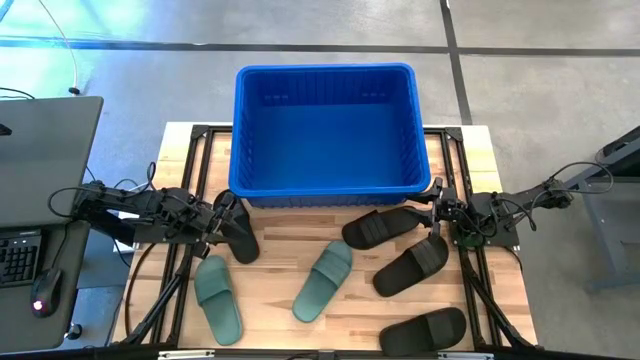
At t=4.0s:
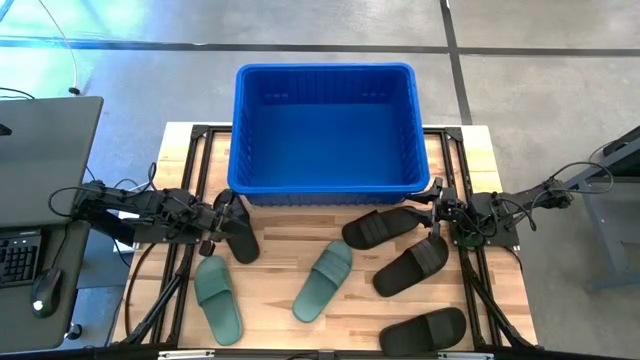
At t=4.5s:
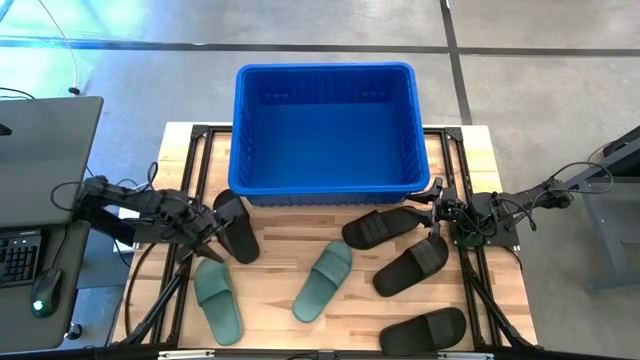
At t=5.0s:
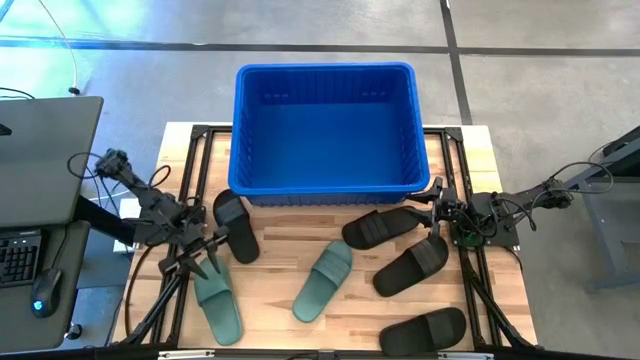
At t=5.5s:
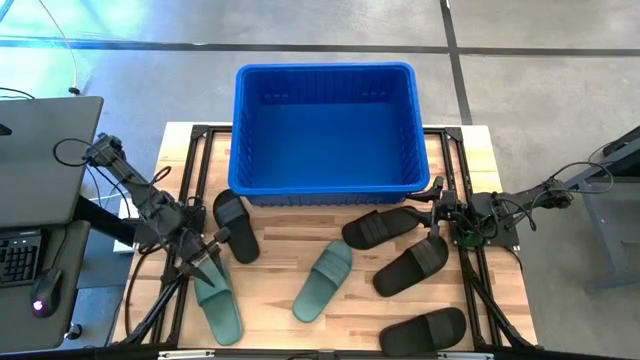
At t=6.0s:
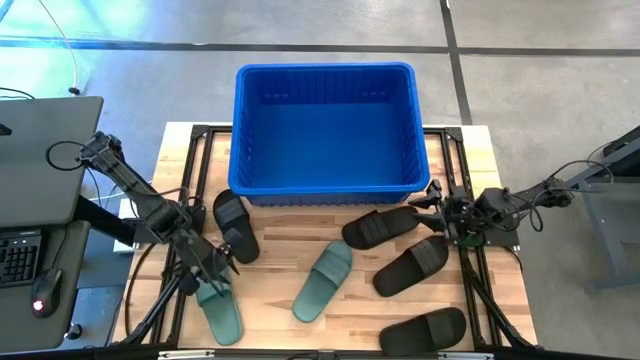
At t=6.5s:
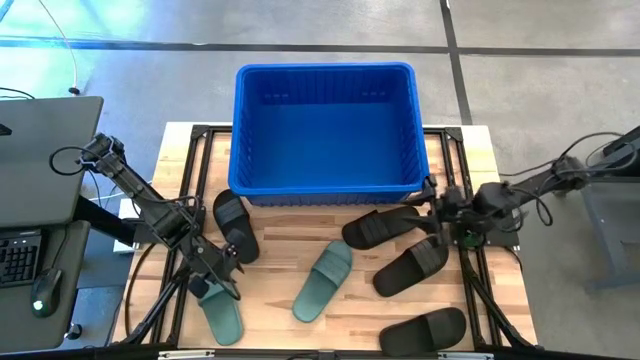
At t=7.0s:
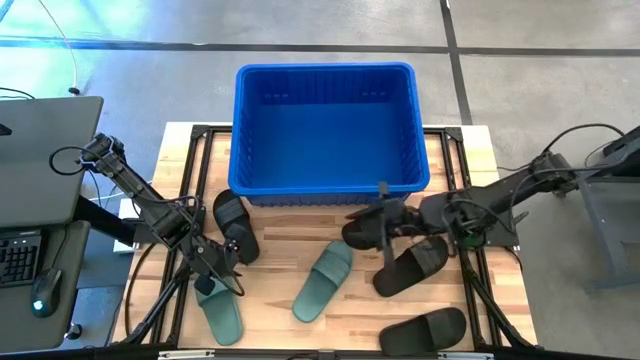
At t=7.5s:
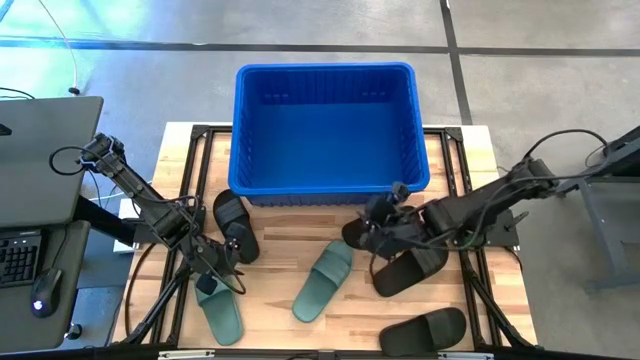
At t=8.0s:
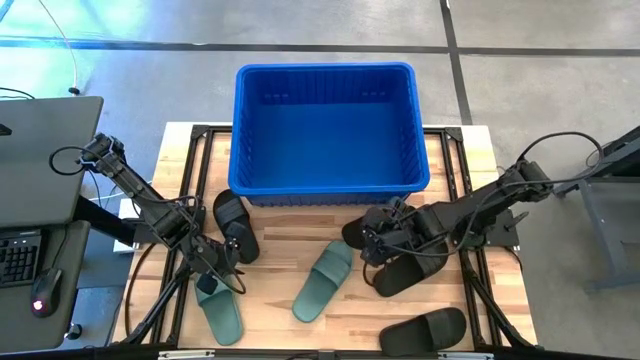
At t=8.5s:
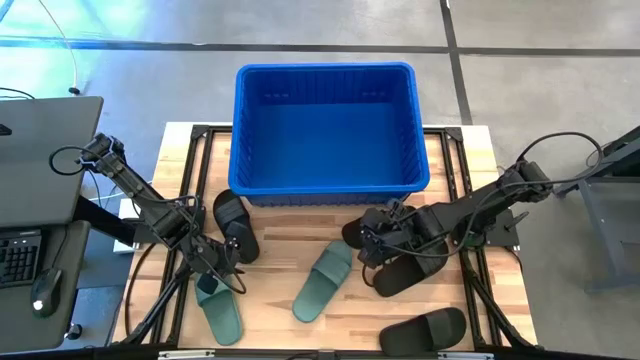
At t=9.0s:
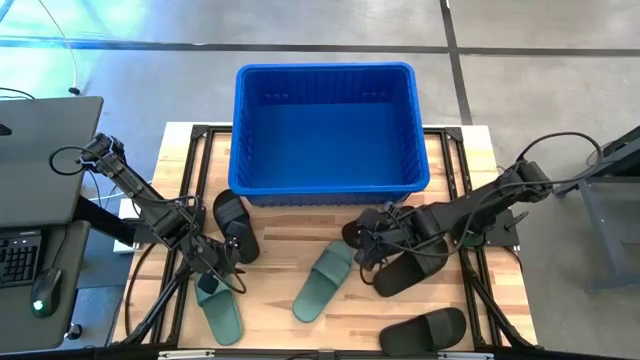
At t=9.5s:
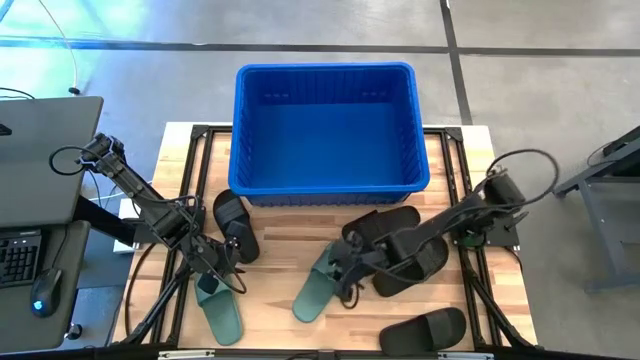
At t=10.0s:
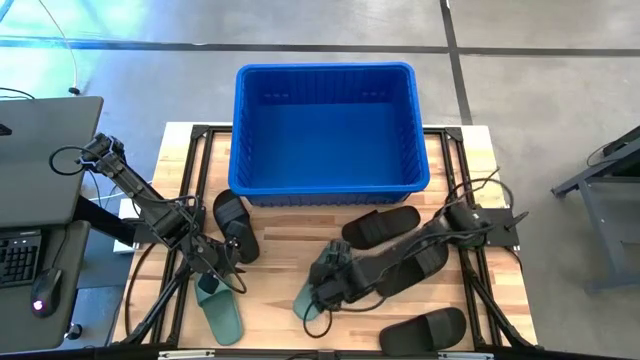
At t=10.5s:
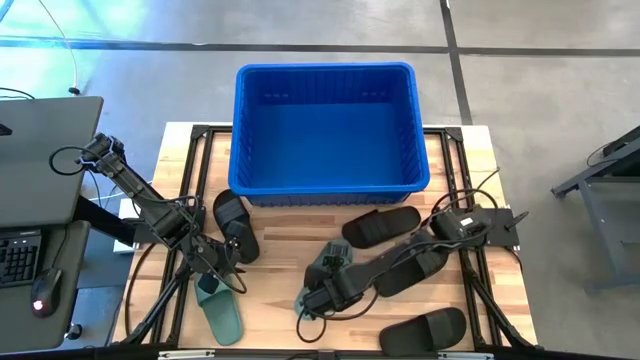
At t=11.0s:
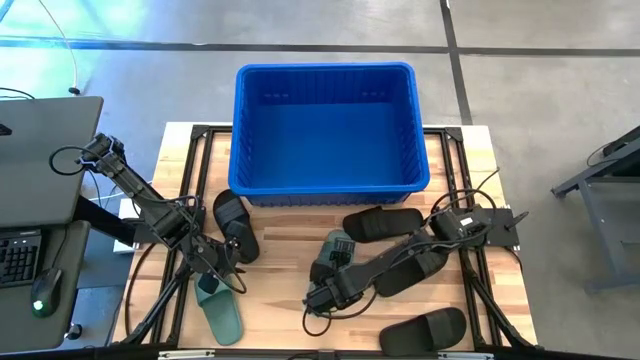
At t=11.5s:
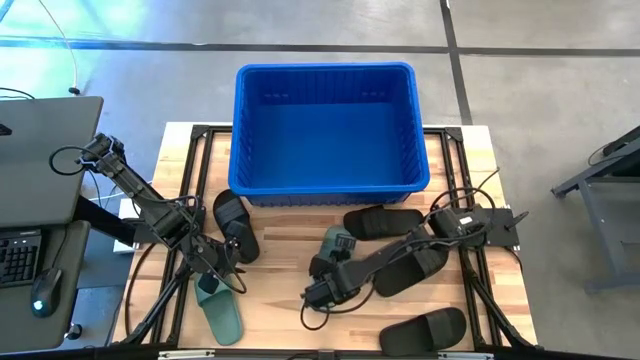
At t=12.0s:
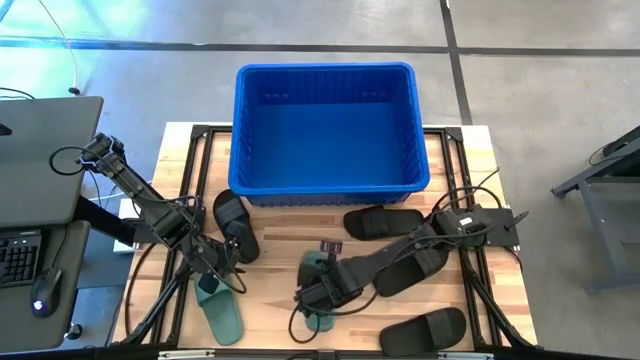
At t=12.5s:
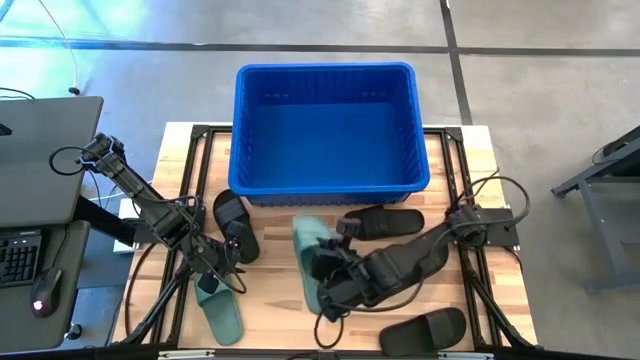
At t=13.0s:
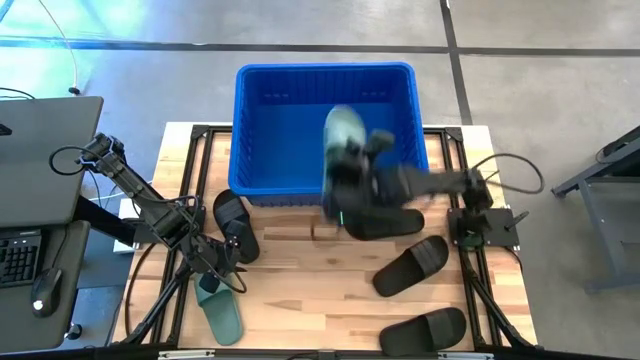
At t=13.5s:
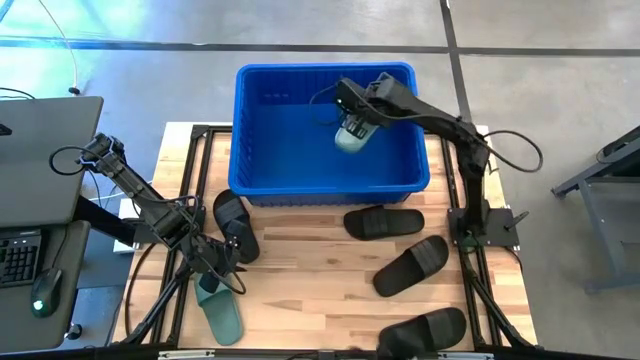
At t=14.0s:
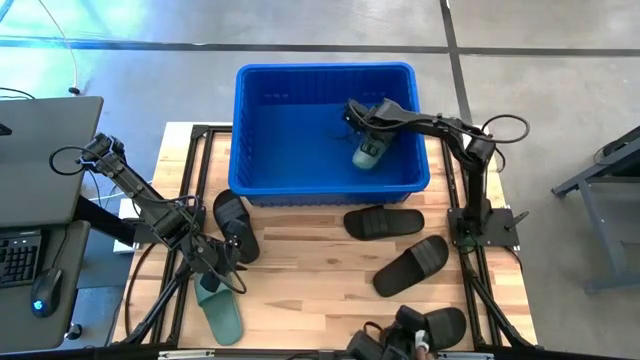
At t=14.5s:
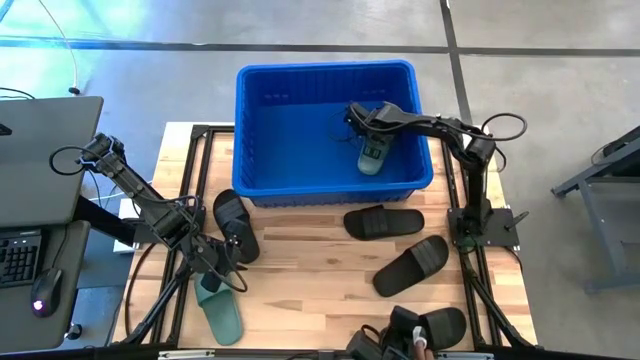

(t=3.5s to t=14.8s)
Task: Pick and place slides into bin
Put the green slide into the blue bin

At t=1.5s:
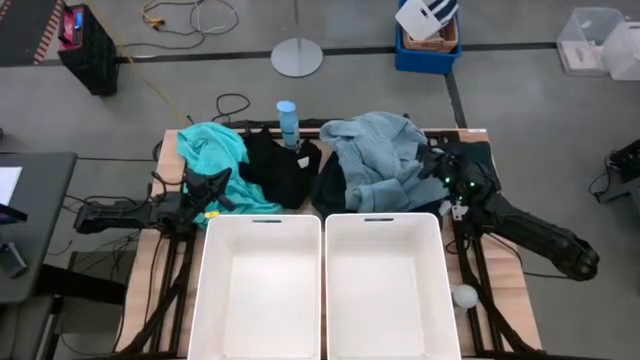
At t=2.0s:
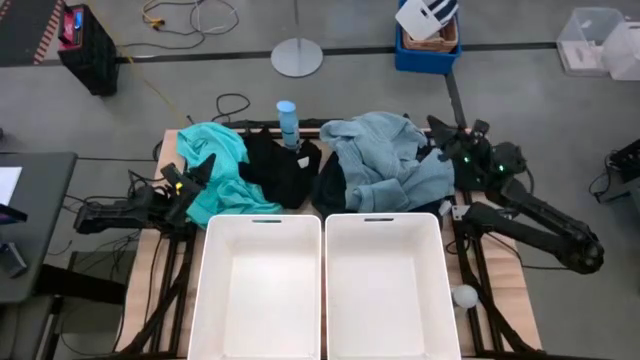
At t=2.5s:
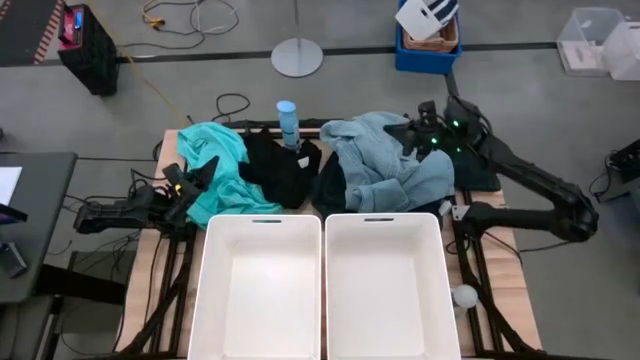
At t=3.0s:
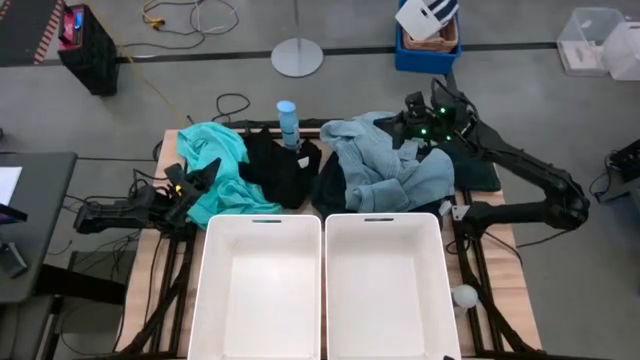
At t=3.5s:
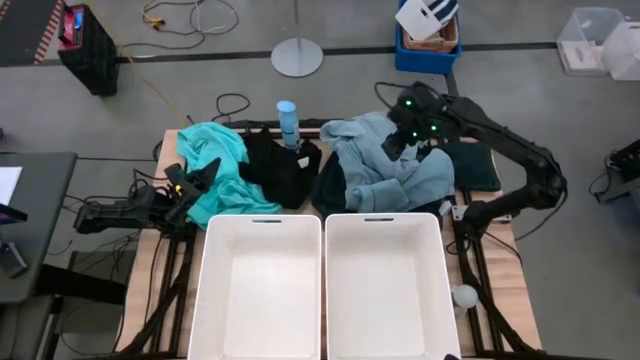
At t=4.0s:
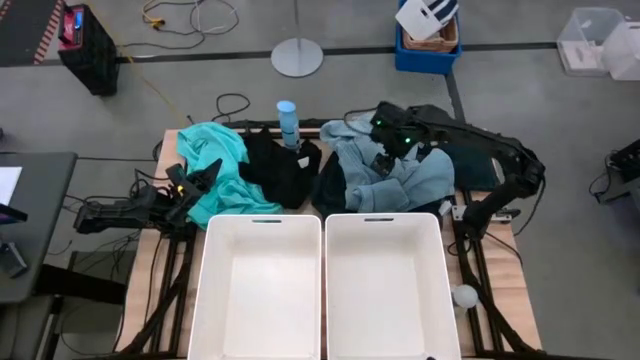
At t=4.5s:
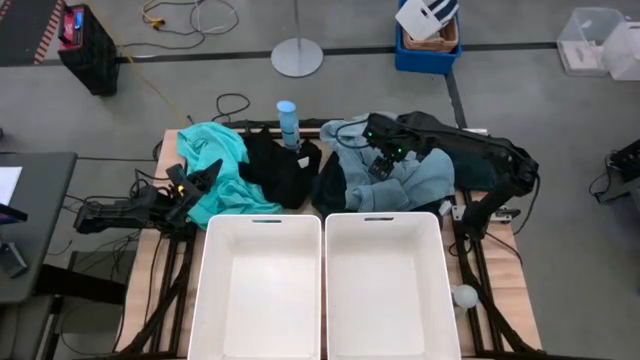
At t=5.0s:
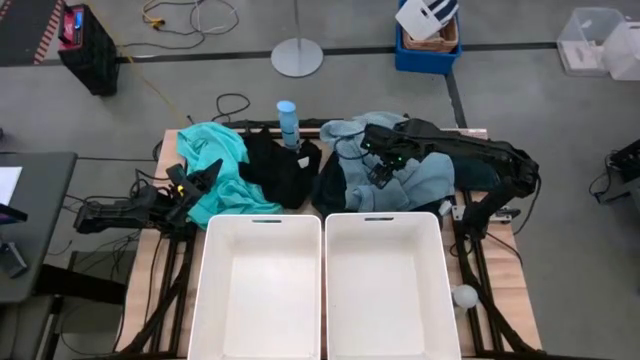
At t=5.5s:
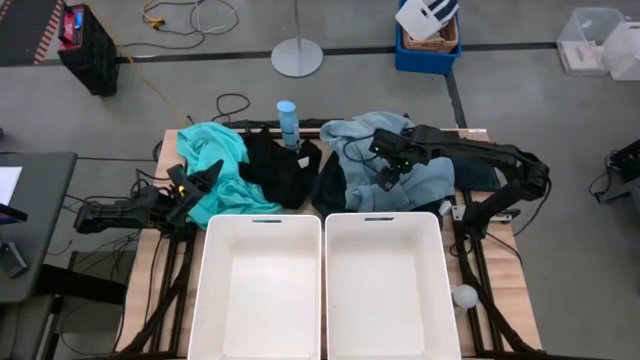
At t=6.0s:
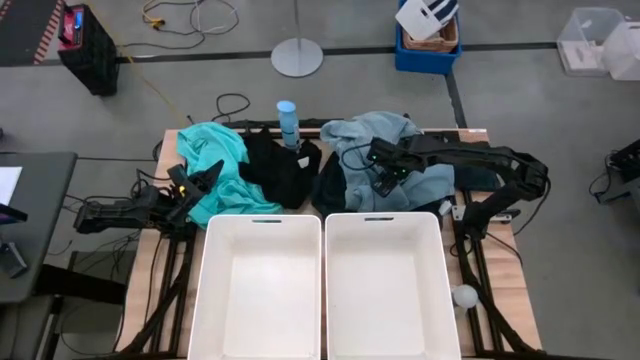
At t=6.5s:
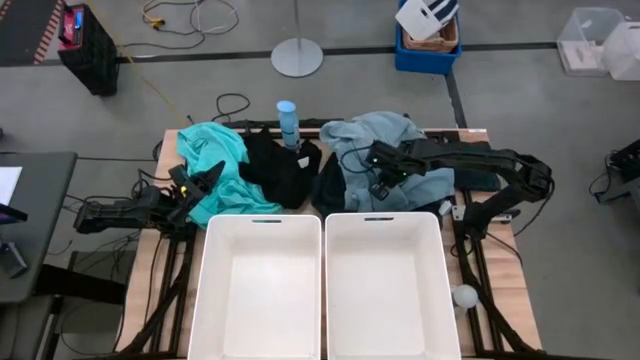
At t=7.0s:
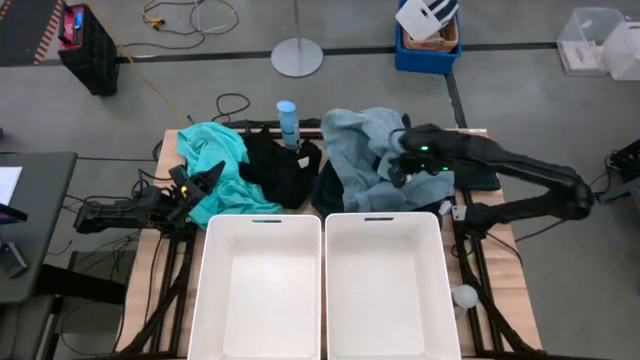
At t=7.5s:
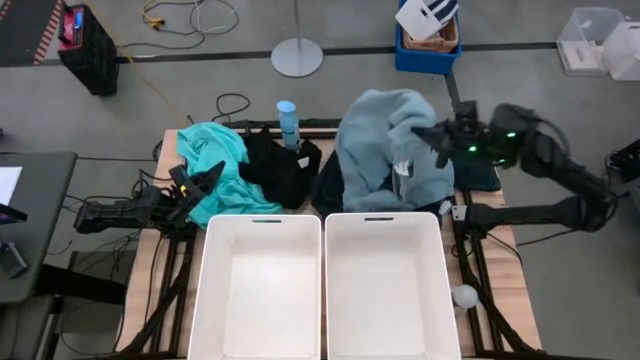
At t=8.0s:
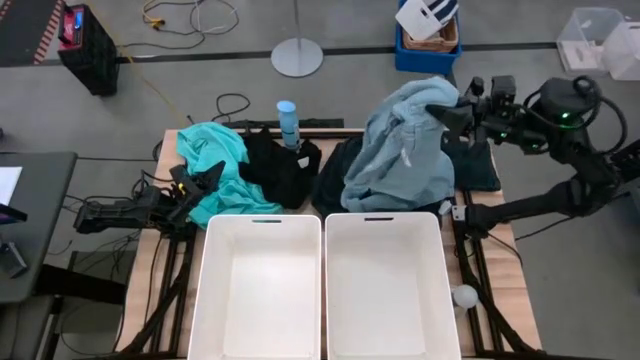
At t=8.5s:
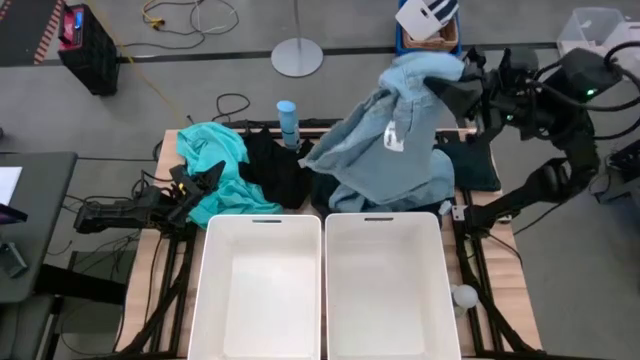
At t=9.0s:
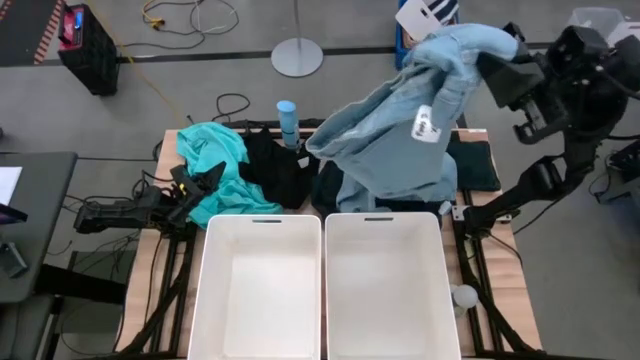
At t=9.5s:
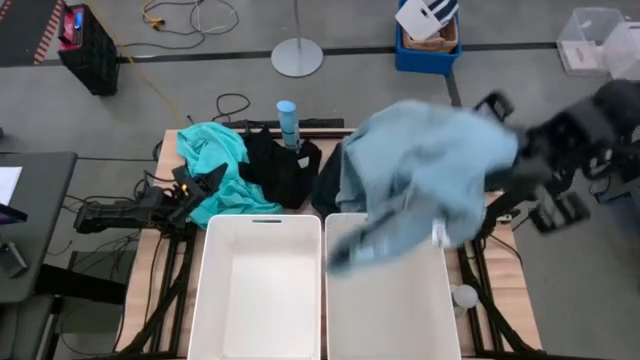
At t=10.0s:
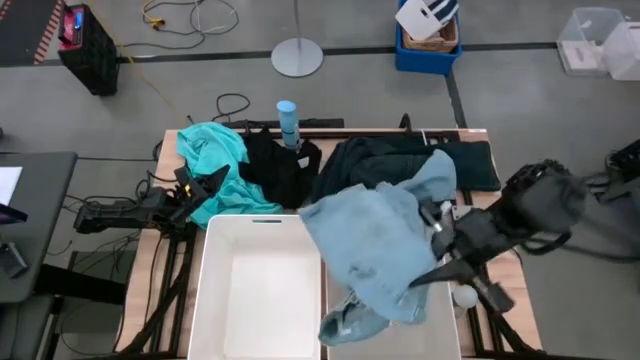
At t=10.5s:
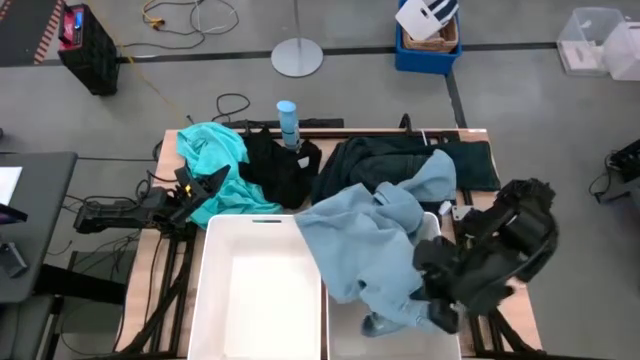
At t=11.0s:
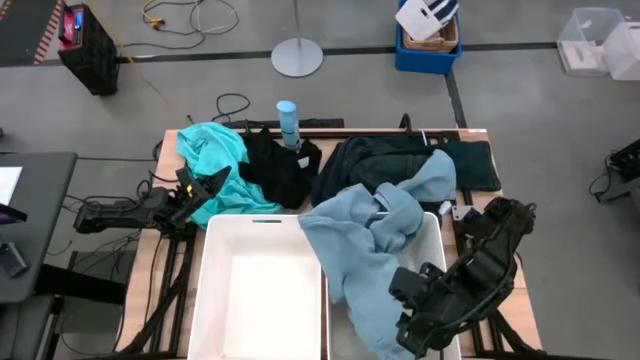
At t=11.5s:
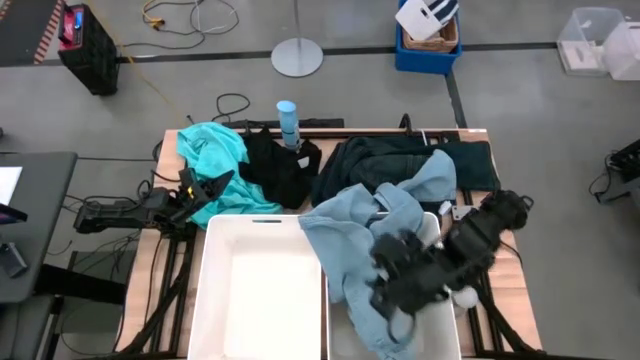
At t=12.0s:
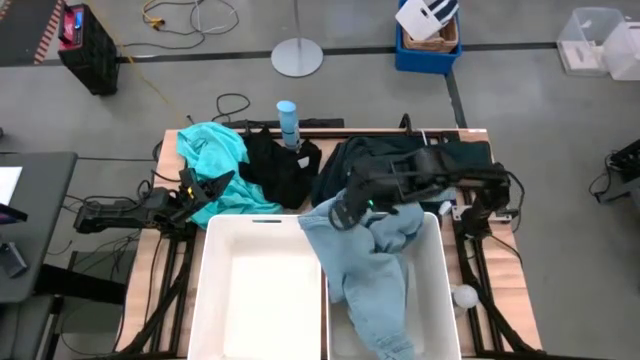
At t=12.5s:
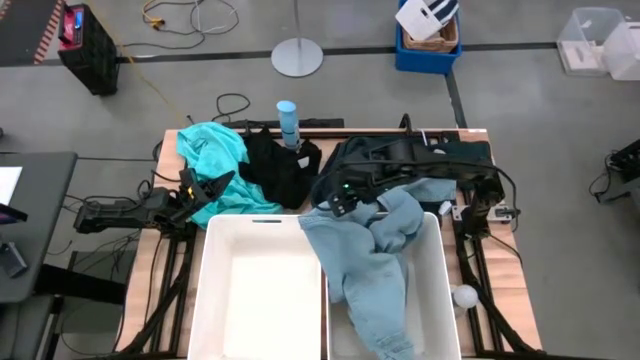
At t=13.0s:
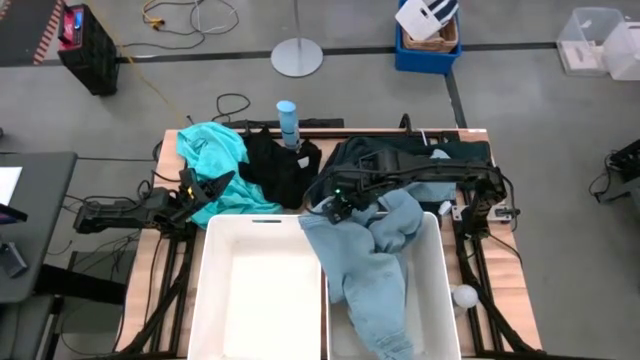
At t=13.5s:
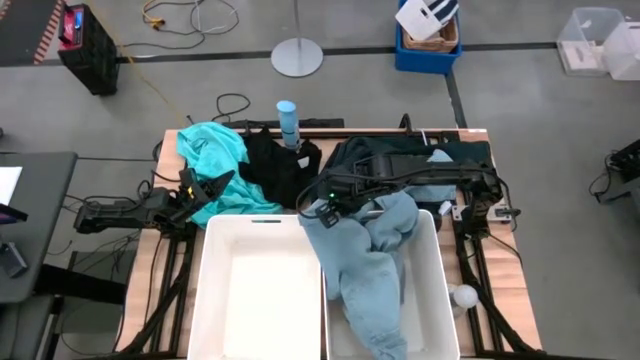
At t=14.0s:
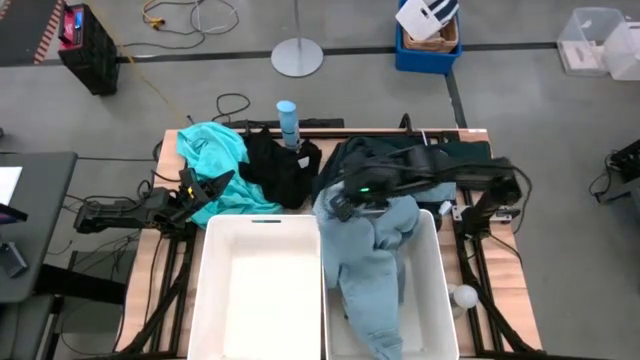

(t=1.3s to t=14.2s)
Task: Sort clothes
Put the light blue pants into the right white bin
